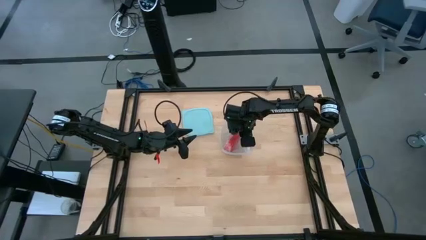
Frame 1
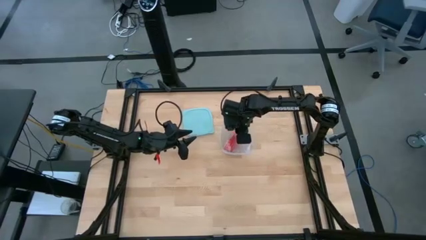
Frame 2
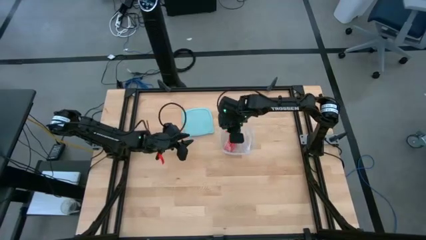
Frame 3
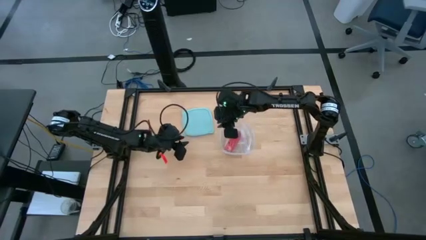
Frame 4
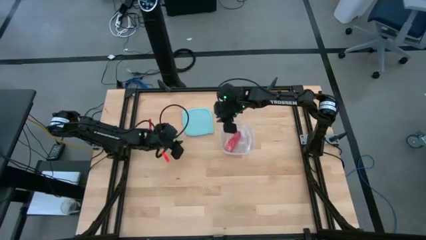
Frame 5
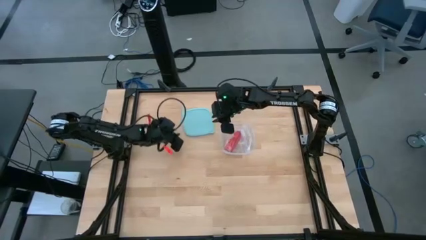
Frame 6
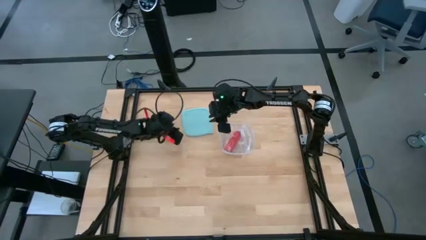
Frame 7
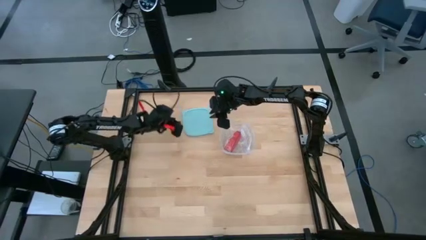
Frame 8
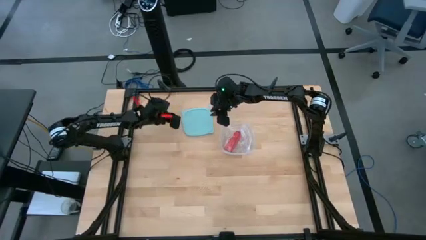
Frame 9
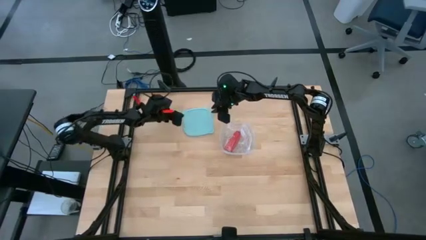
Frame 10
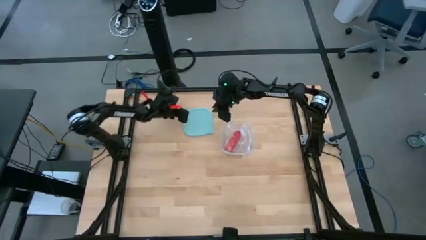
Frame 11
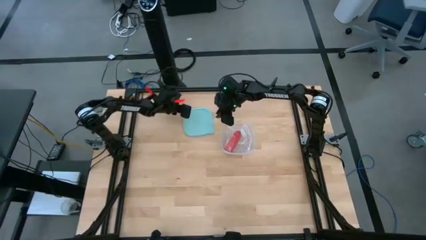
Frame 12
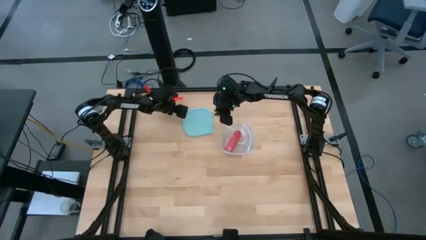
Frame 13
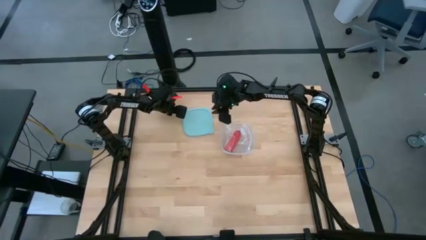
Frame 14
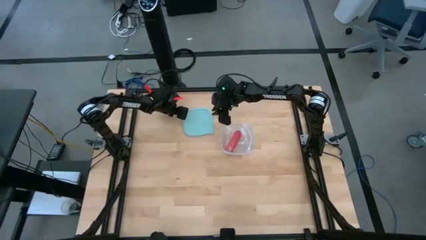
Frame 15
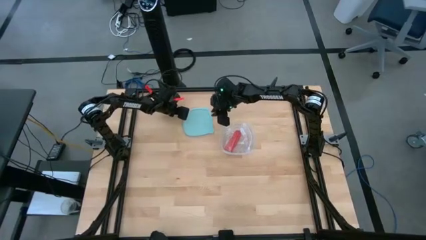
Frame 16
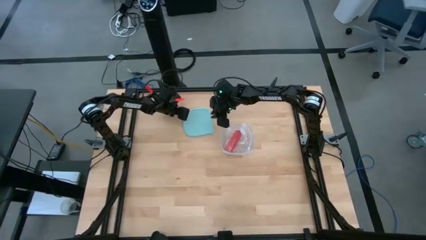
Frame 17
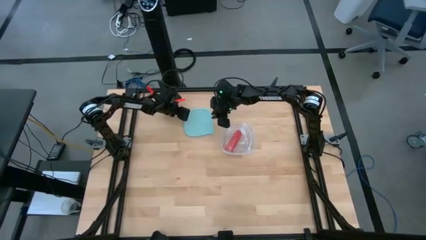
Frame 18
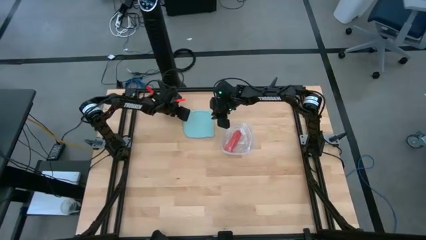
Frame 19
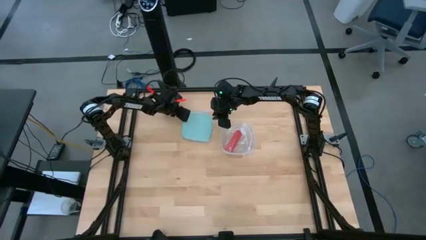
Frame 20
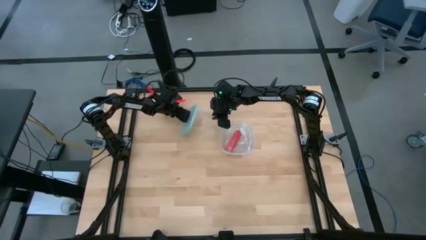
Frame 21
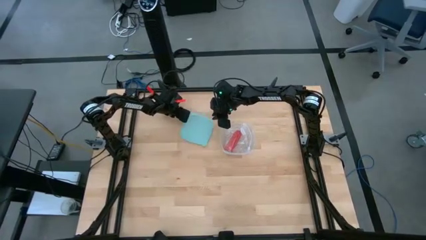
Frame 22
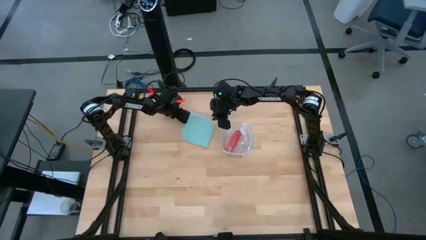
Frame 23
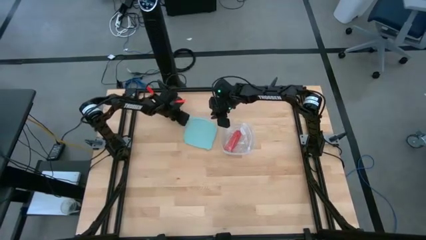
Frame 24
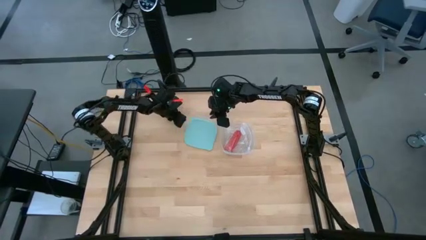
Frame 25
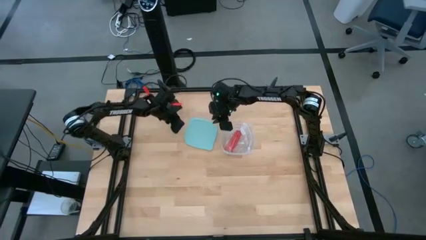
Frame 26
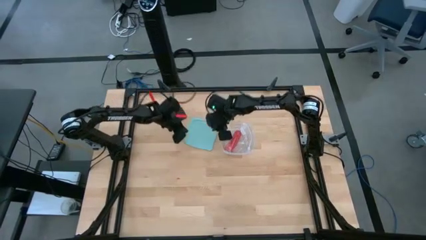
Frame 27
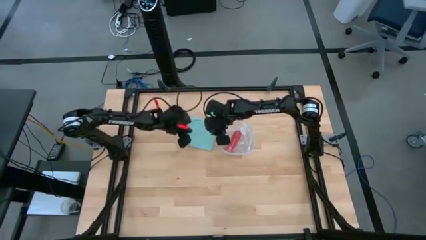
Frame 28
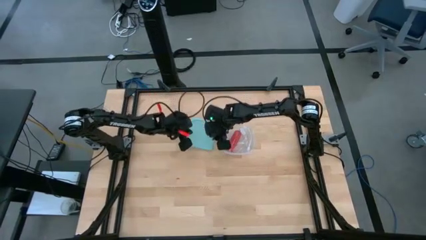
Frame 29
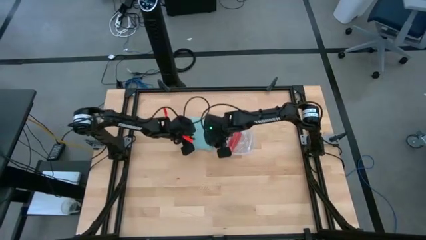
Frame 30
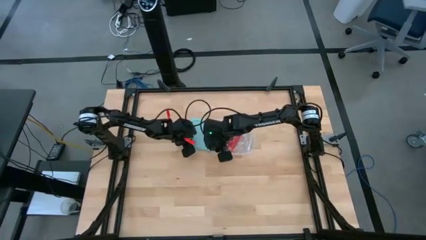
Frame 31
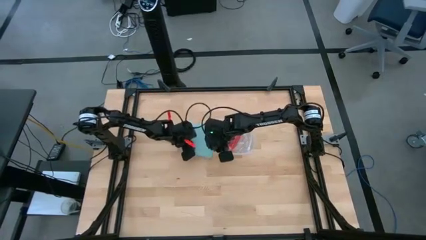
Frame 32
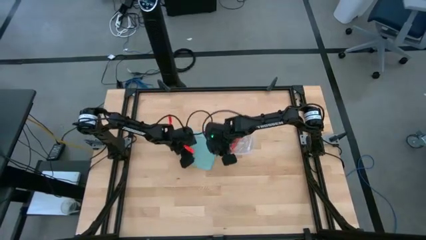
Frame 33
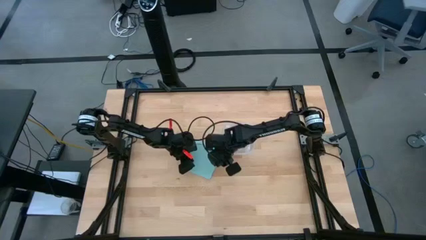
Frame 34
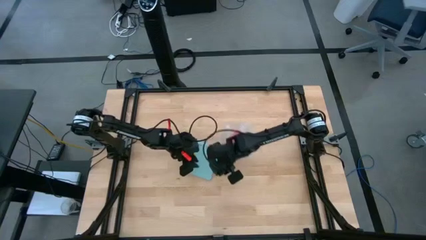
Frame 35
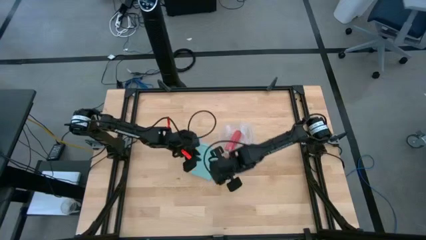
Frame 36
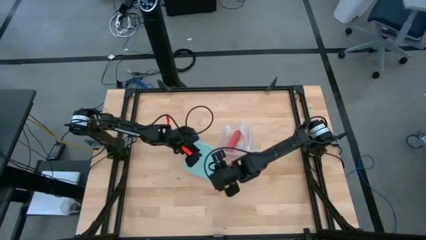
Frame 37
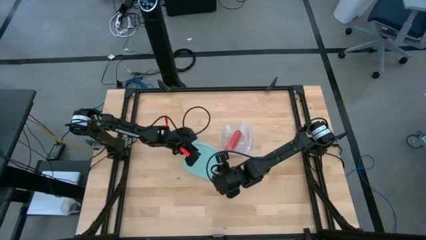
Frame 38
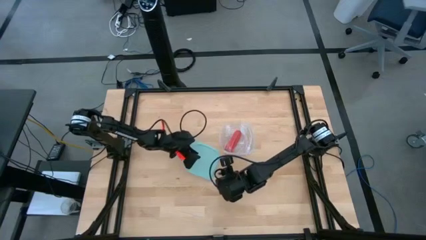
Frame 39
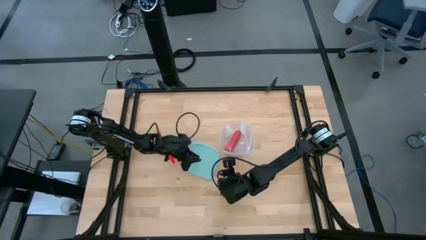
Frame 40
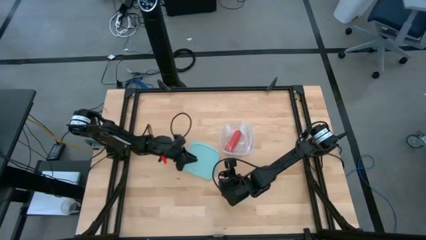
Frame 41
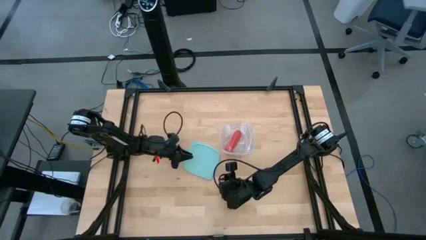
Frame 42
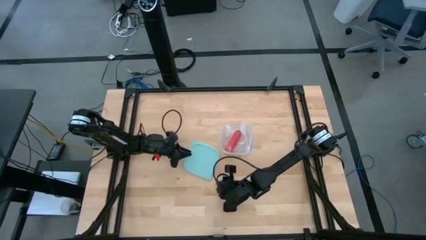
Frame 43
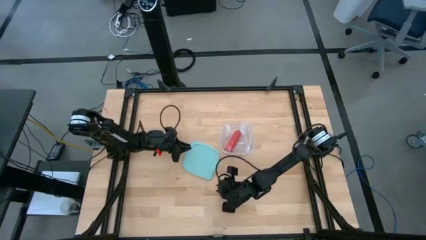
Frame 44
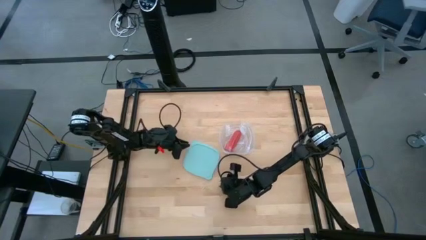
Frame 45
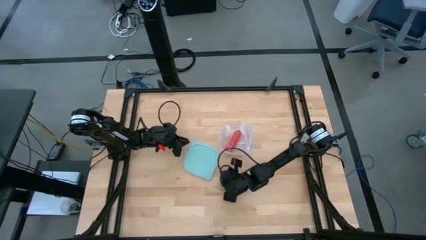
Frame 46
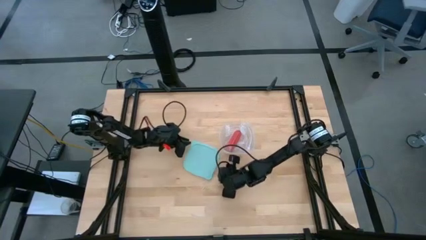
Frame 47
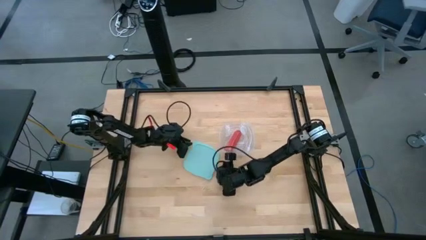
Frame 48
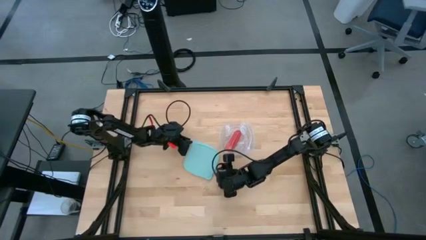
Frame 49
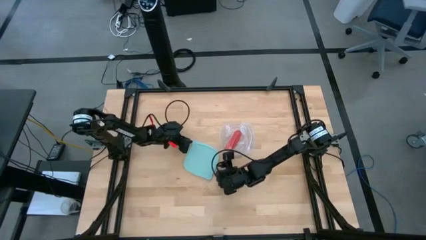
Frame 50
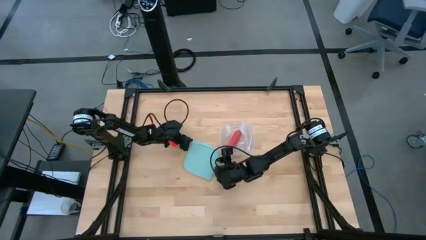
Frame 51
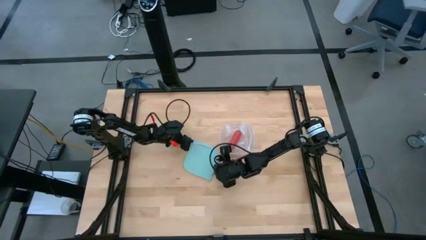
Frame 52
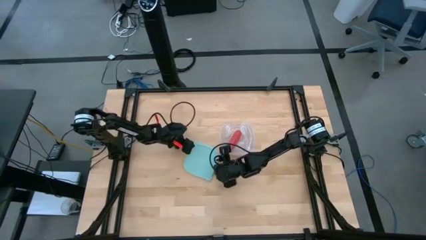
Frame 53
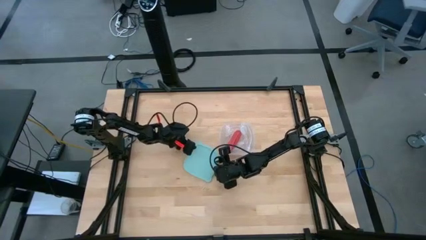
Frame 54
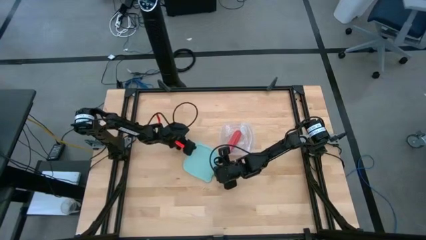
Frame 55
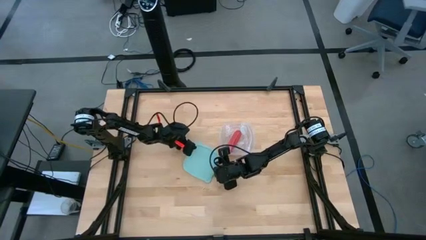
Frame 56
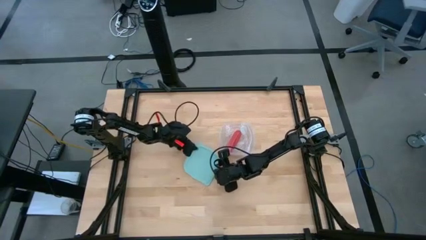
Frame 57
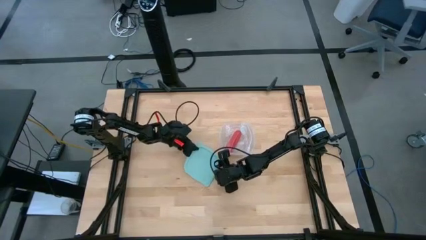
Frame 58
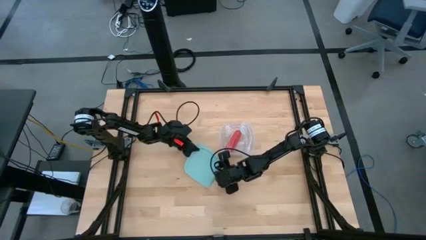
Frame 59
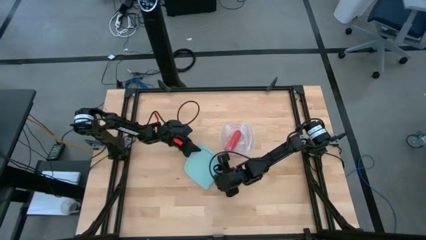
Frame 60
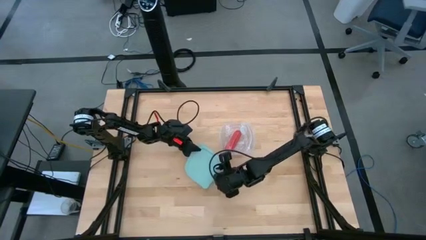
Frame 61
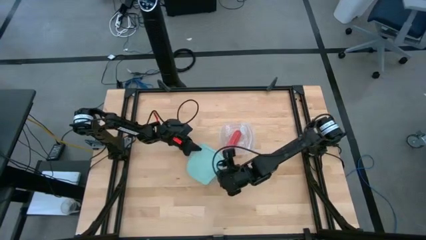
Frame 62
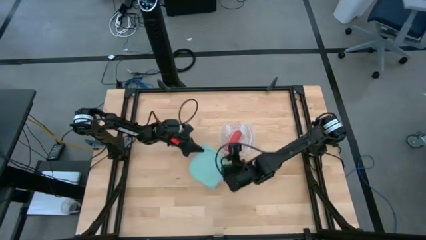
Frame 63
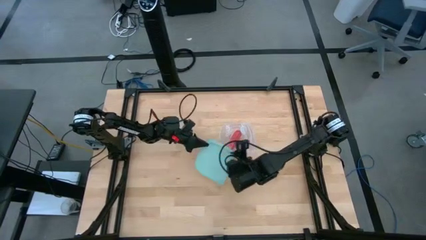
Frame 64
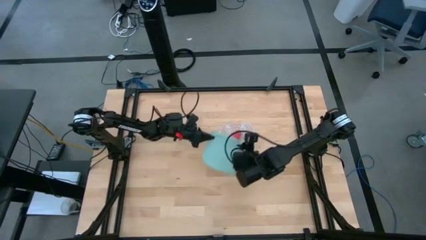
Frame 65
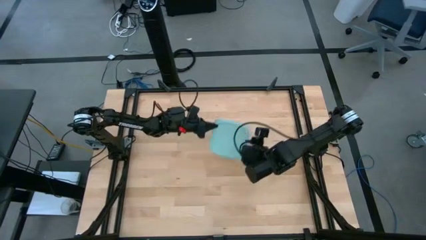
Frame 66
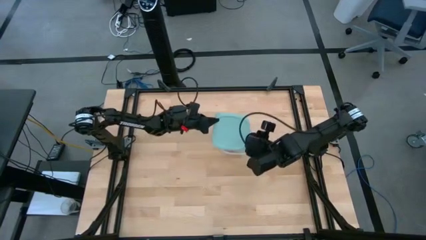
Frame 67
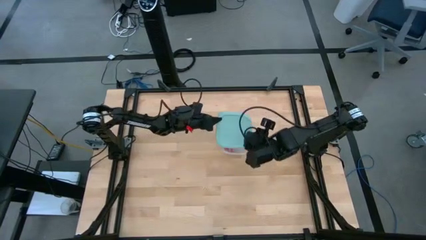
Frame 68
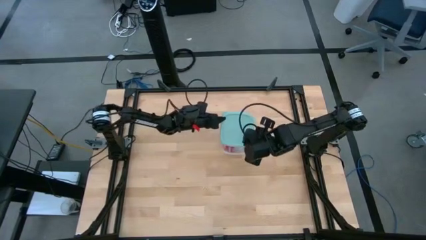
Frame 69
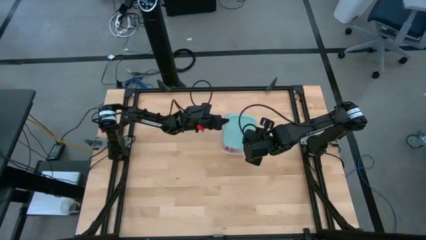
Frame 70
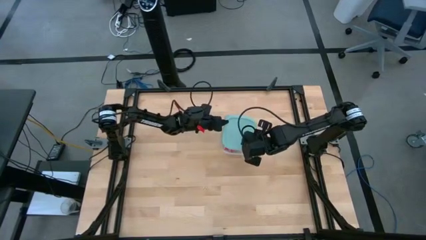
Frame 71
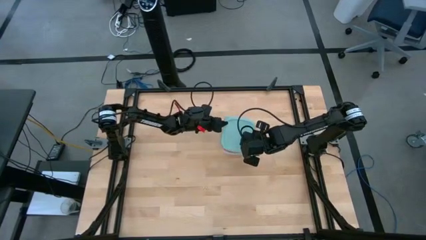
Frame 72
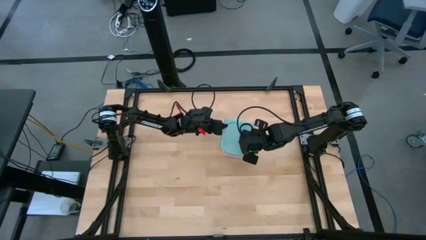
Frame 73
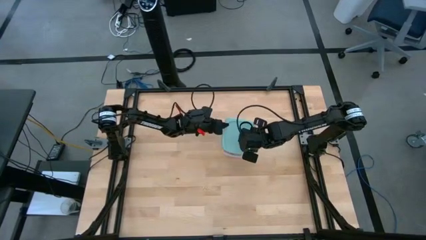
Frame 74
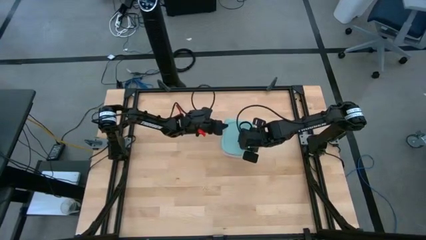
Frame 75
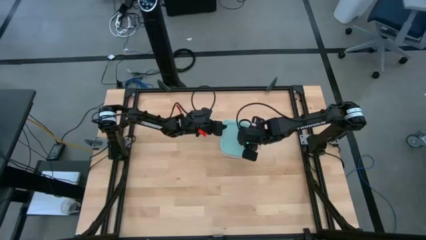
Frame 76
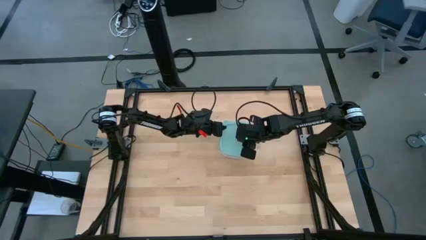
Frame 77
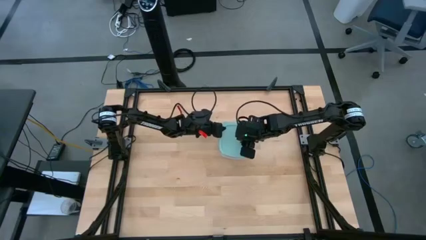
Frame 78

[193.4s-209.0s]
Task: Roll bandage
Close the transparent tupperware

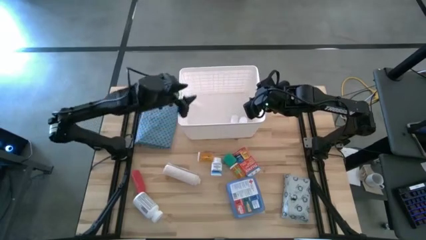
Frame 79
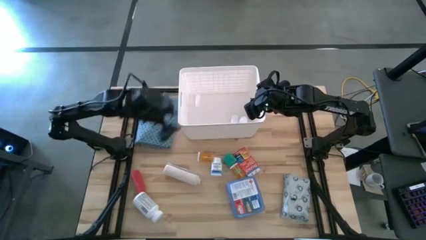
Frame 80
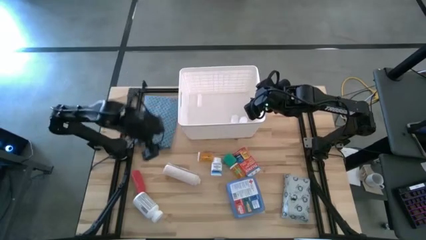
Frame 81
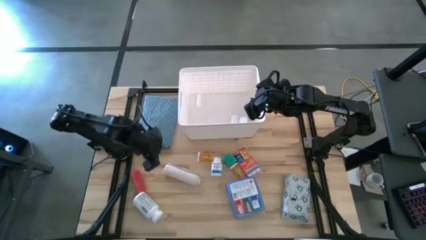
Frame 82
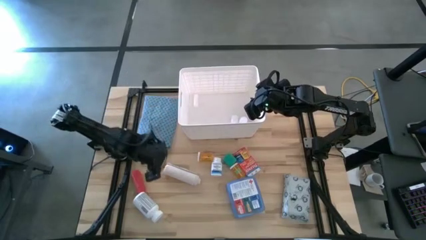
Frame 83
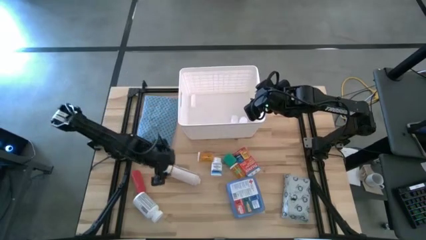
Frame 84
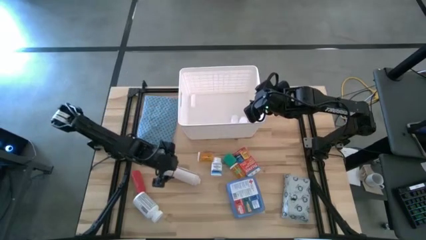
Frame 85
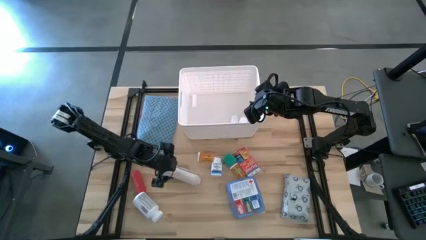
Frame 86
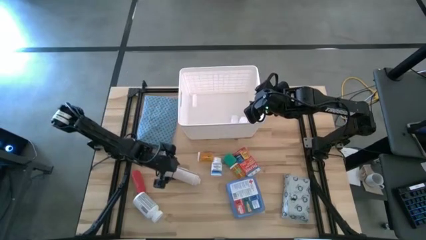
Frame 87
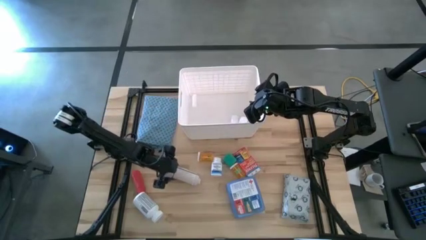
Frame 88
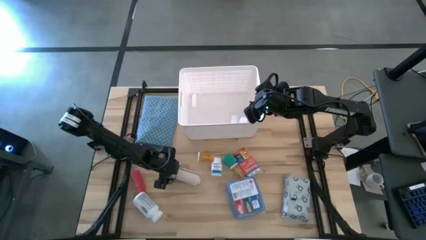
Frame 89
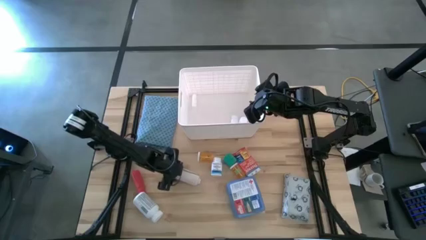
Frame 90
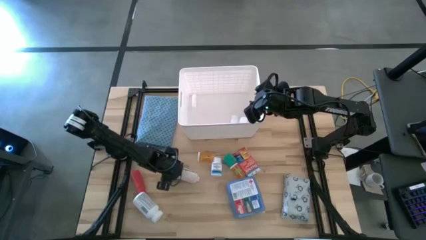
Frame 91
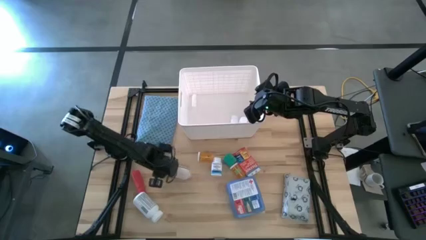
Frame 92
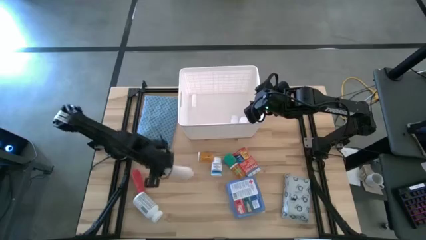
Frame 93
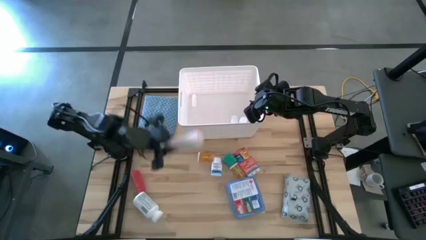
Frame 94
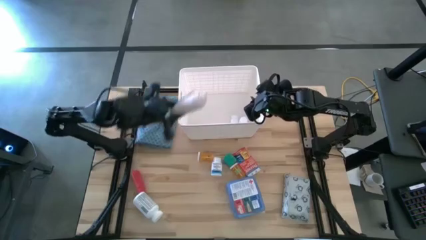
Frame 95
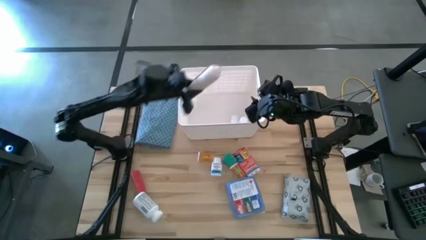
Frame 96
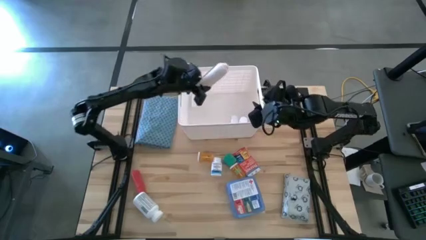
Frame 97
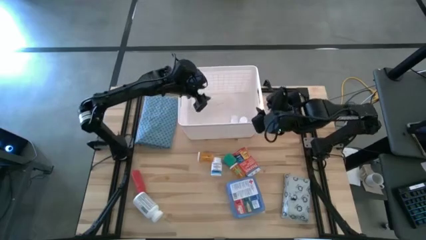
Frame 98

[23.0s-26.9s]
Task: Pick & place medical supplies in basket/bin
Put the white bandage into the white bin
